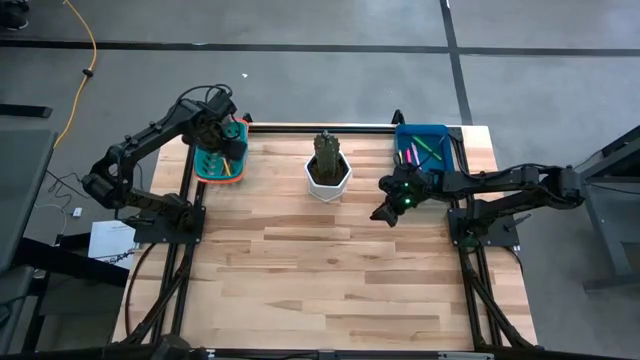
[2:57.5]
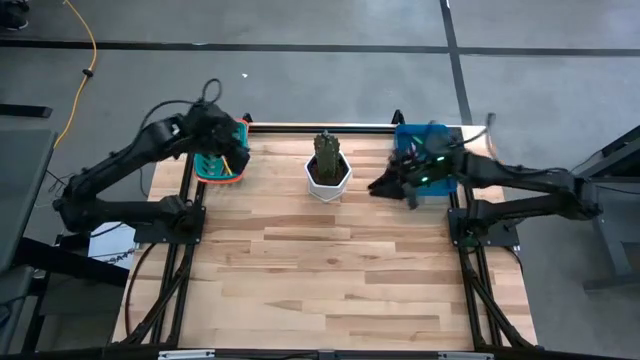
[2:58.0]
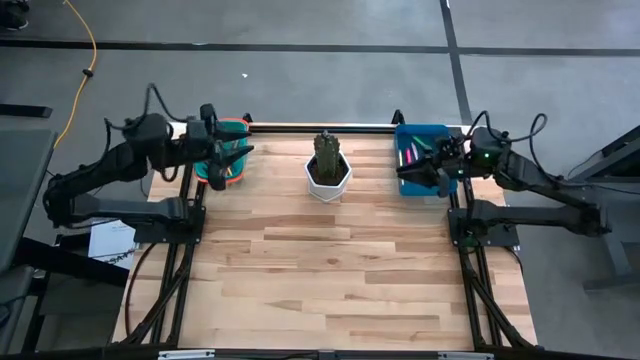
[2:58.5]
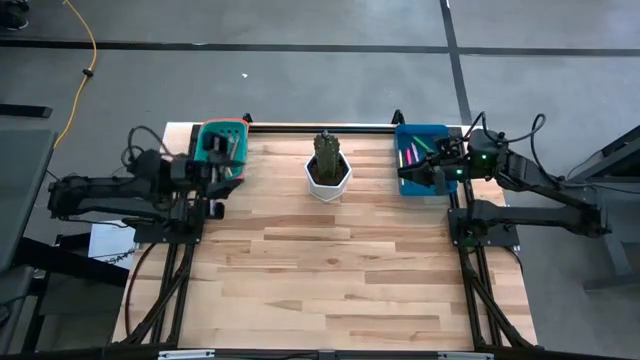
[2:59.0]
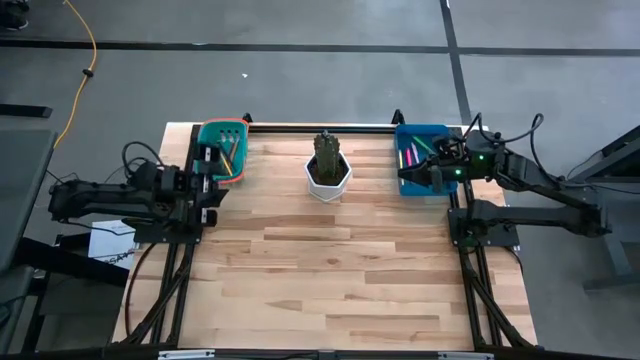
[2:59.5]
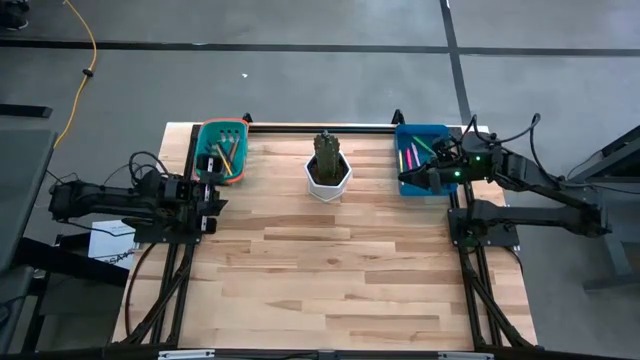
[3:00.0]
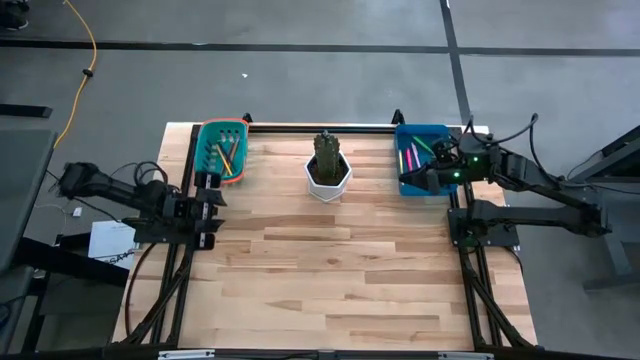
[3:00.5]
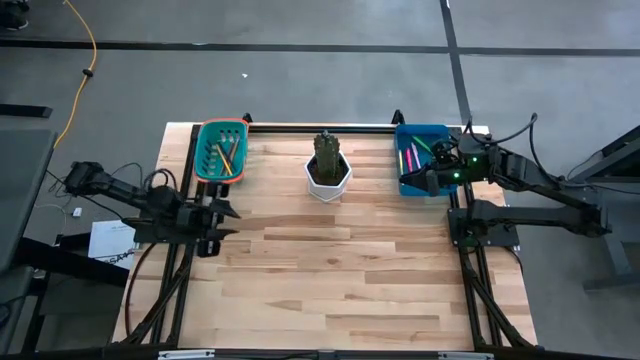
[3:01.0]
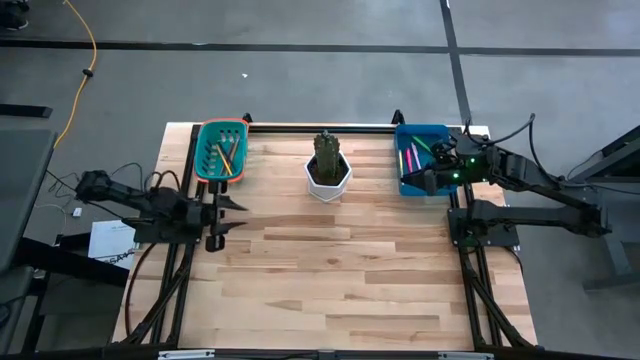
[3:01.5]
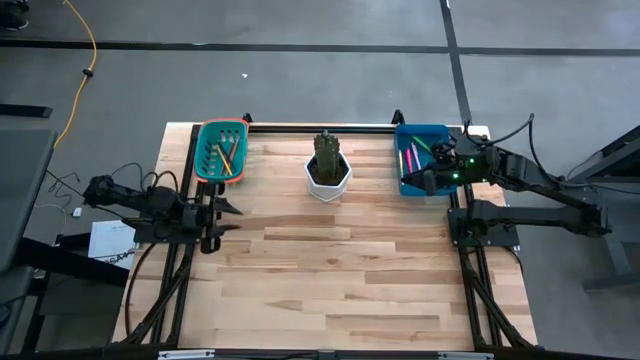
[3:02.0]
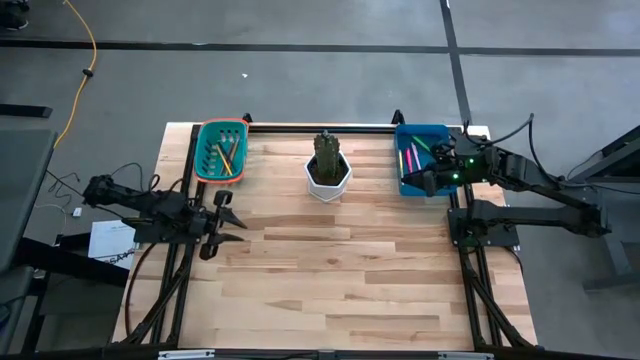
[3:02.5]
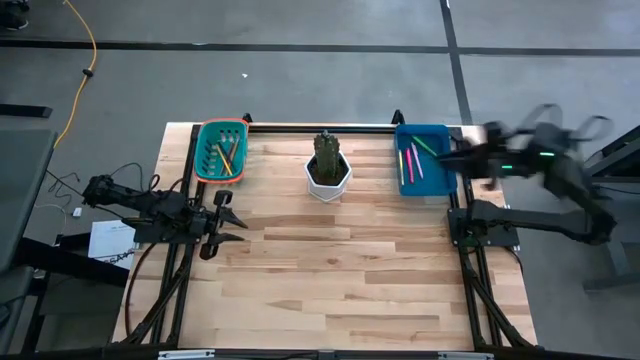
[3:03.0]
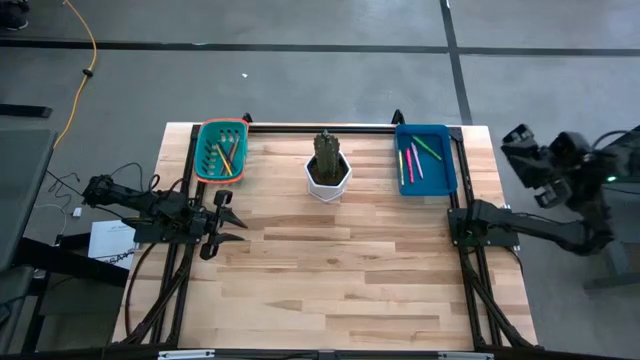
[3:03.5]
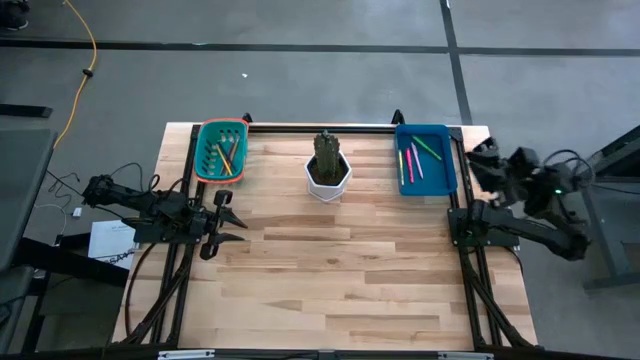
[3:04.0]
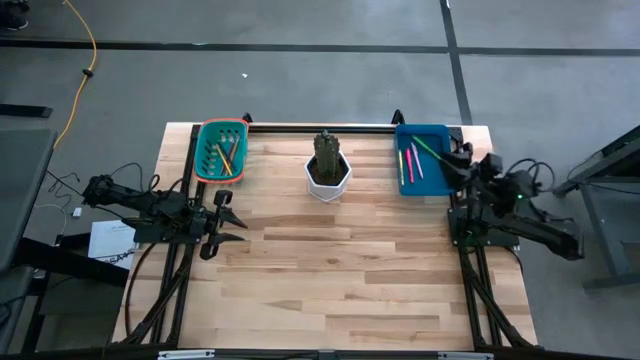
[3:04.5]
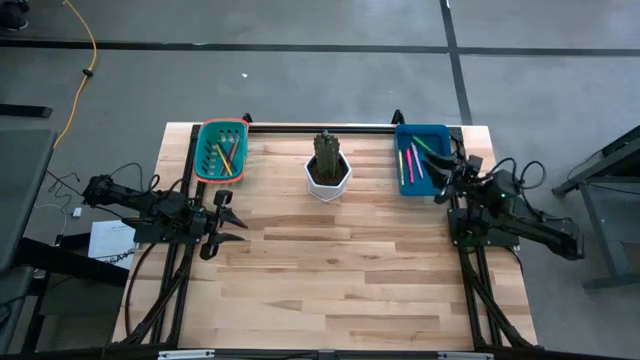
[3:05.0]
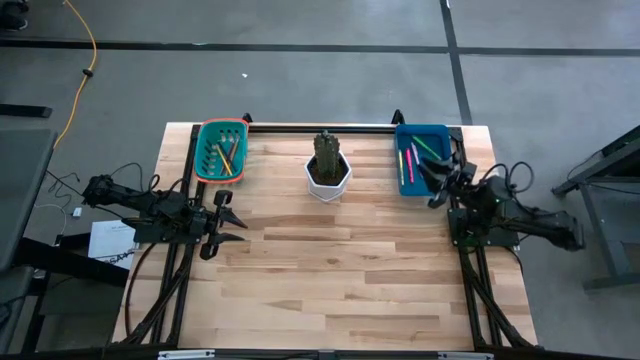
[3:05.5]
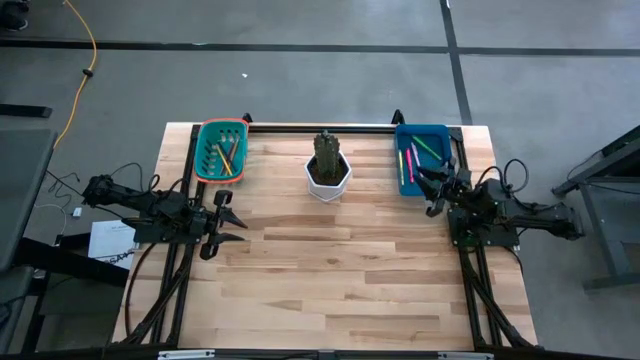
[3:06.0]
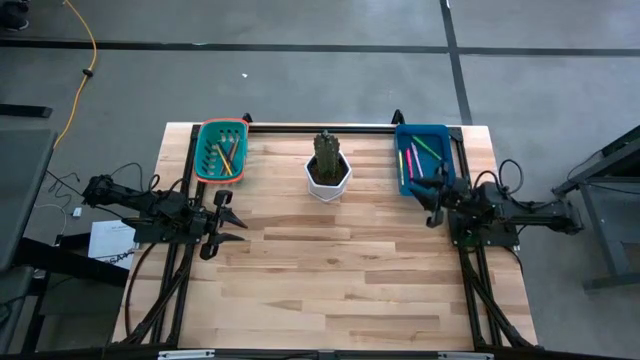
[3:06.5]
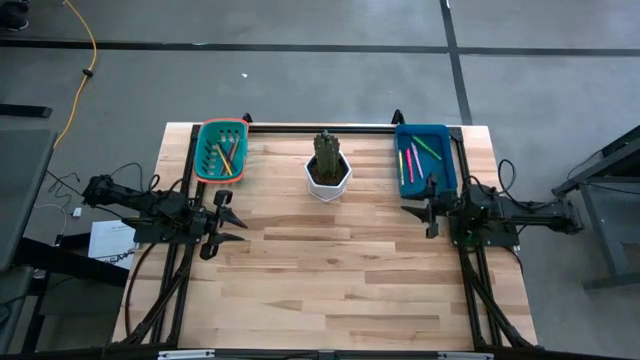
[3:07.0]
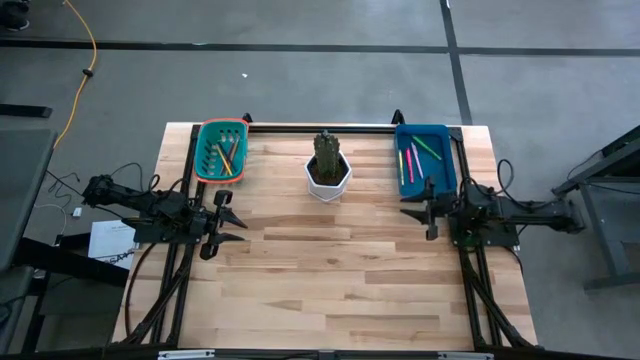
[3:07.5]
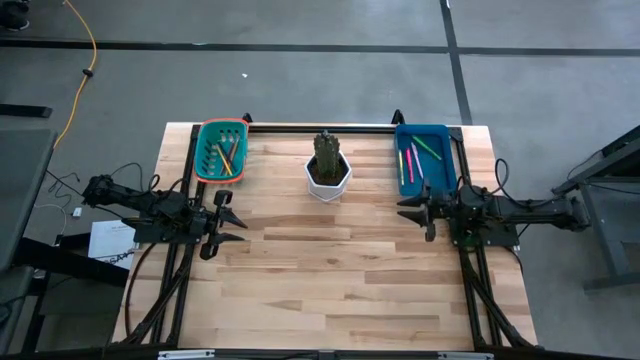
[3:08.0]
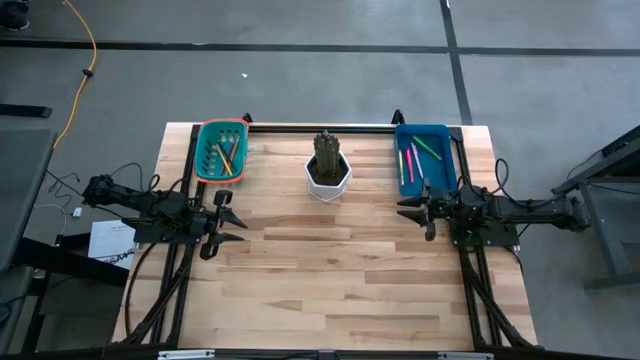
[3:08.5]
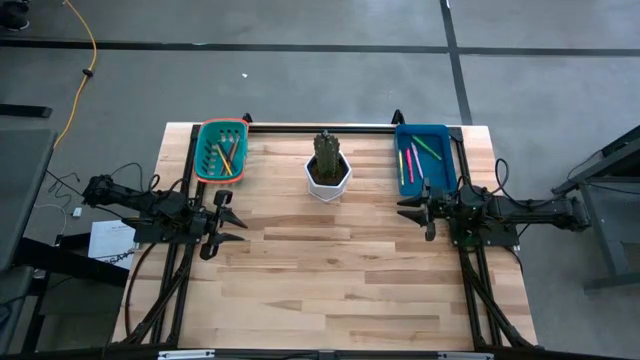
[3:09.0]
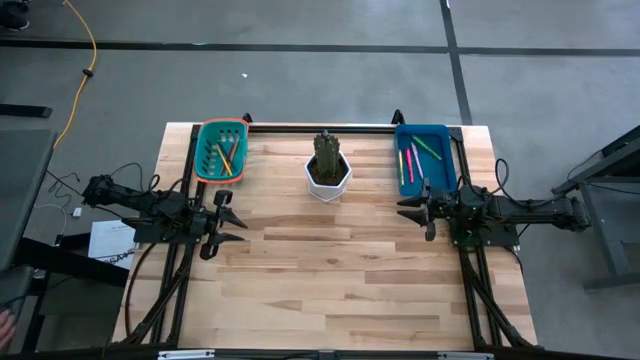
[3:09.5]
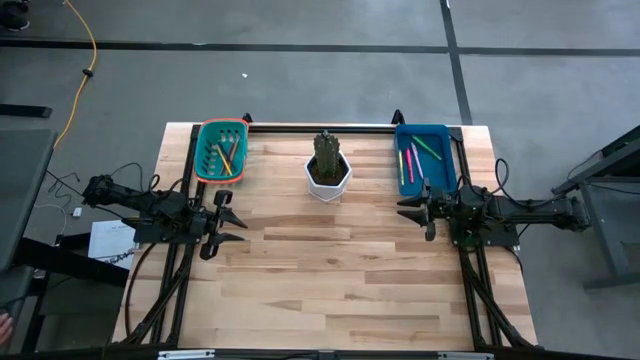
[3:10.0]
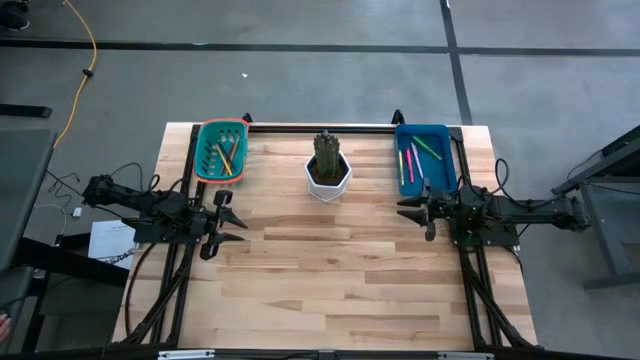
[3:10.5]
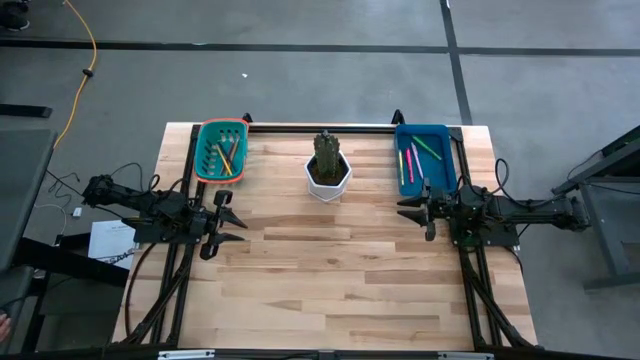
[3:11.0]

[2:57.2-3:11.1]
Task: Sort pens & pencils
Return to Home Position
